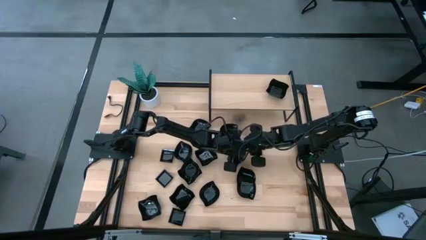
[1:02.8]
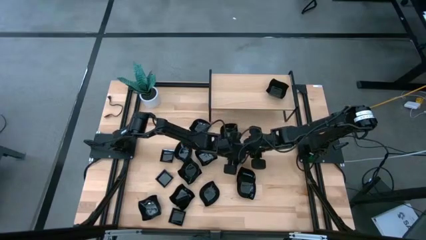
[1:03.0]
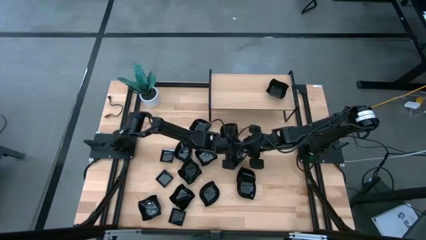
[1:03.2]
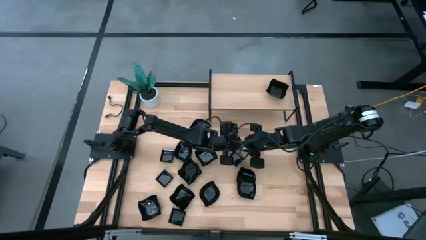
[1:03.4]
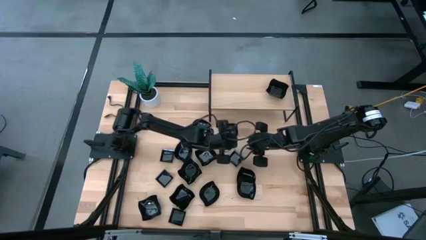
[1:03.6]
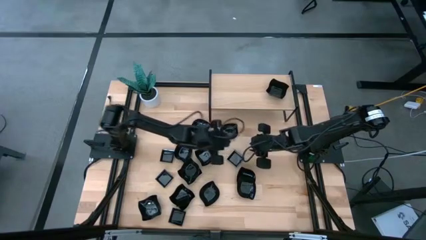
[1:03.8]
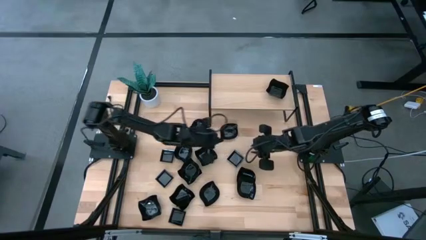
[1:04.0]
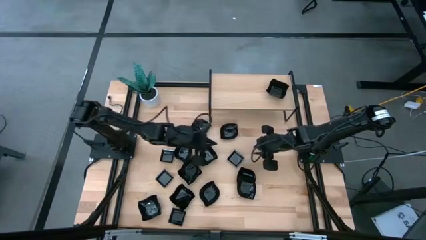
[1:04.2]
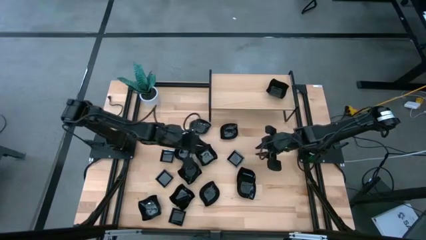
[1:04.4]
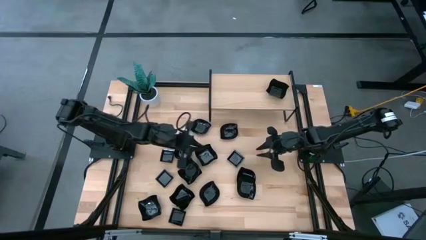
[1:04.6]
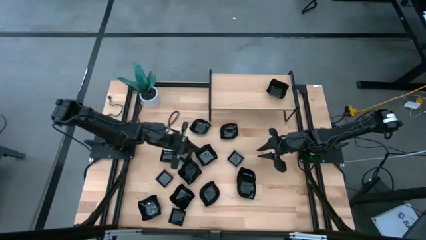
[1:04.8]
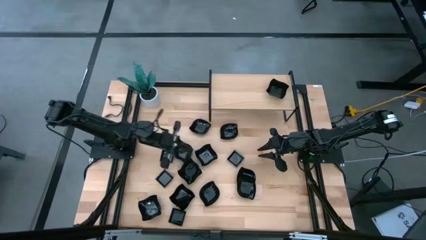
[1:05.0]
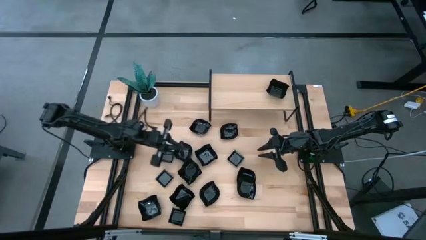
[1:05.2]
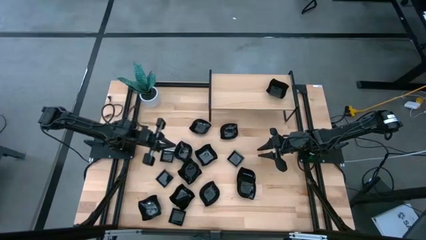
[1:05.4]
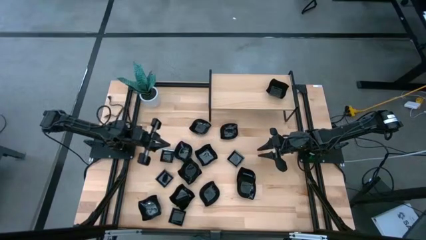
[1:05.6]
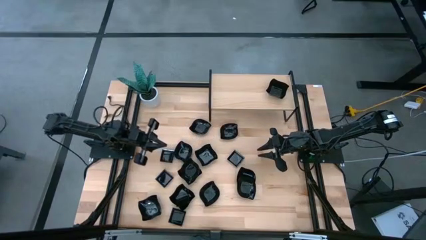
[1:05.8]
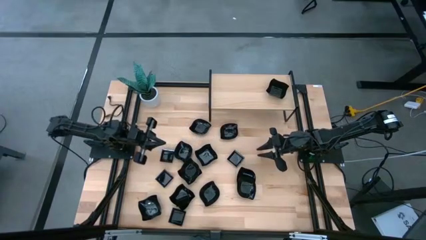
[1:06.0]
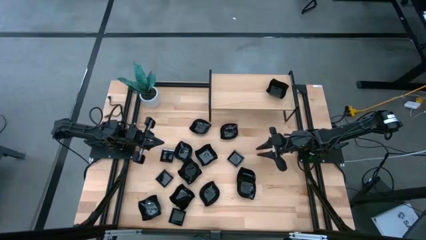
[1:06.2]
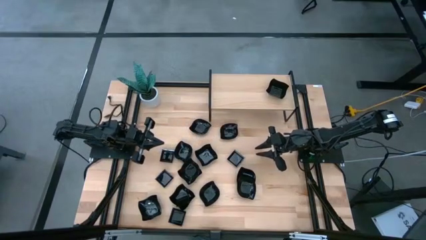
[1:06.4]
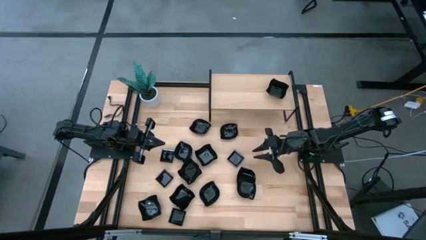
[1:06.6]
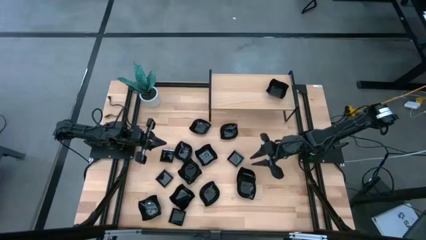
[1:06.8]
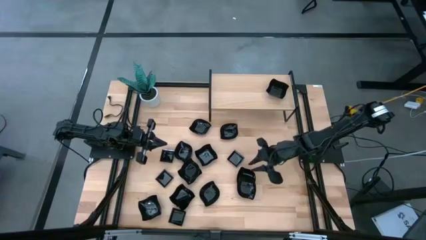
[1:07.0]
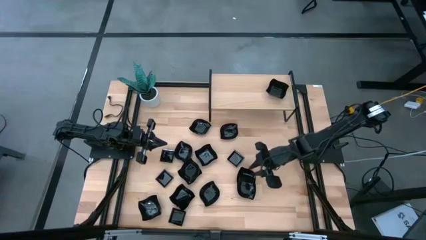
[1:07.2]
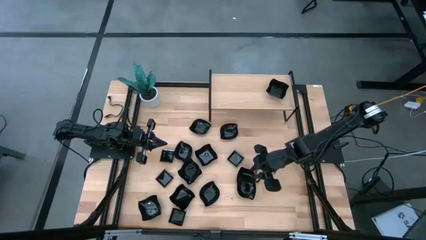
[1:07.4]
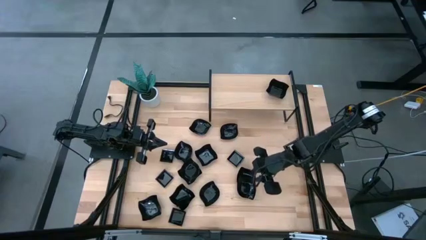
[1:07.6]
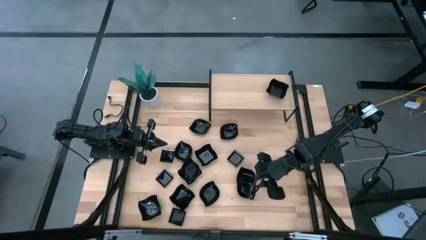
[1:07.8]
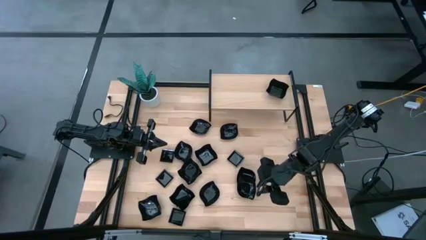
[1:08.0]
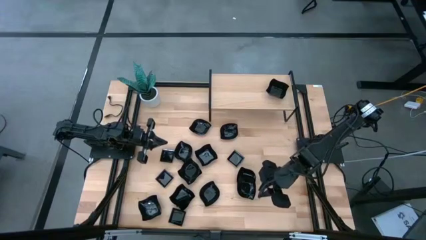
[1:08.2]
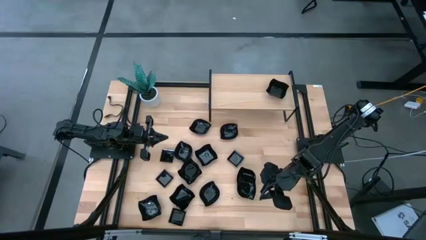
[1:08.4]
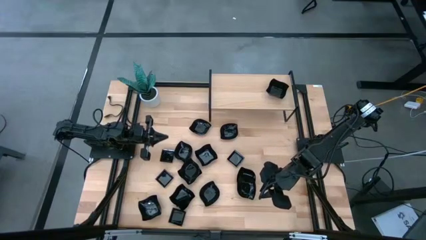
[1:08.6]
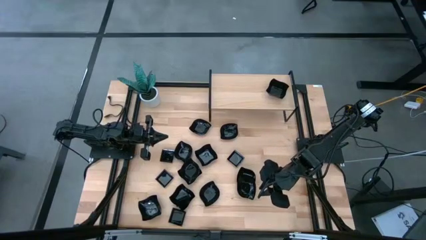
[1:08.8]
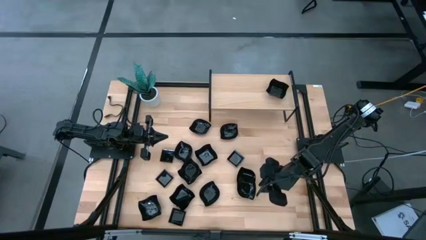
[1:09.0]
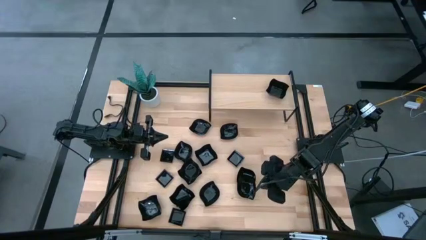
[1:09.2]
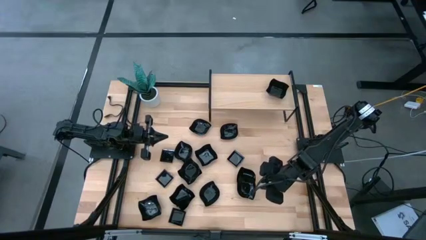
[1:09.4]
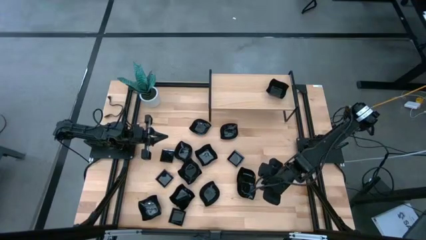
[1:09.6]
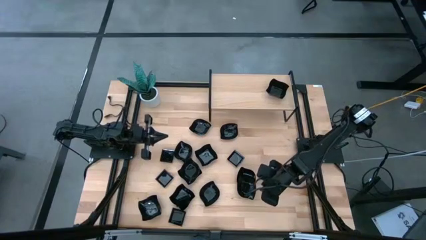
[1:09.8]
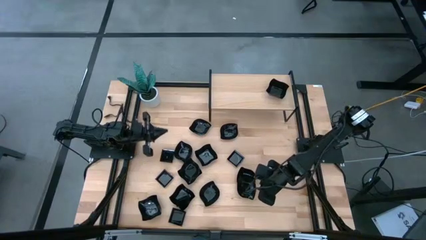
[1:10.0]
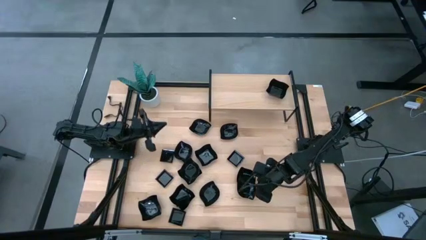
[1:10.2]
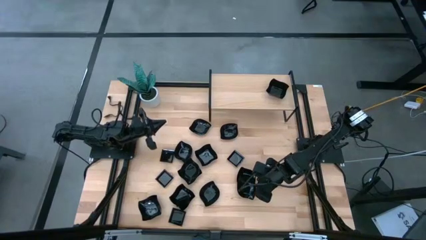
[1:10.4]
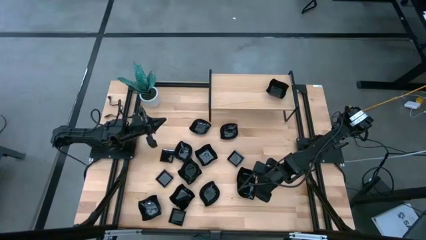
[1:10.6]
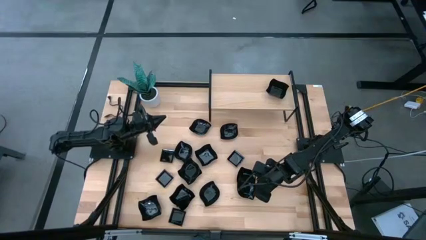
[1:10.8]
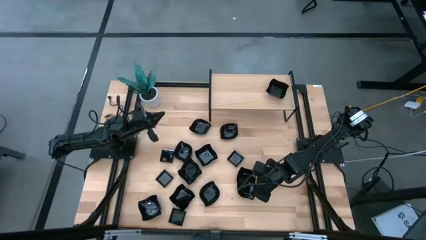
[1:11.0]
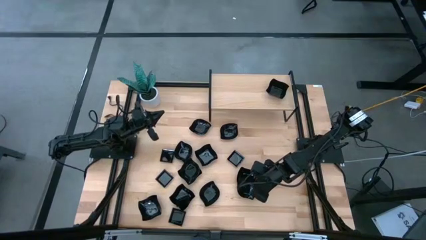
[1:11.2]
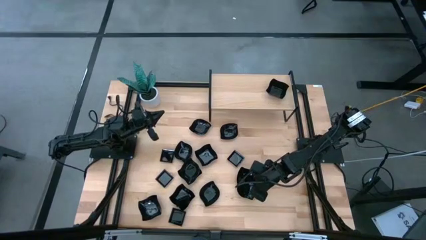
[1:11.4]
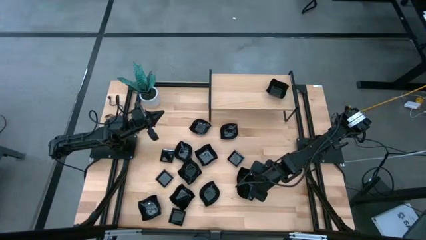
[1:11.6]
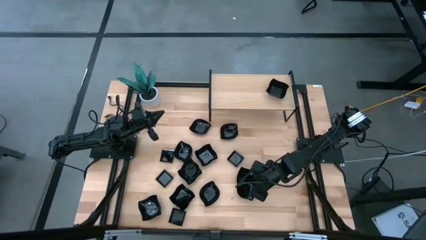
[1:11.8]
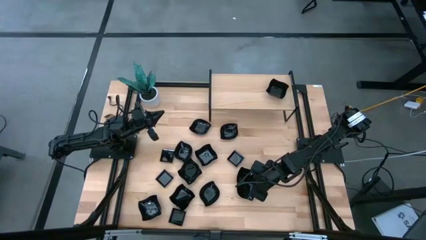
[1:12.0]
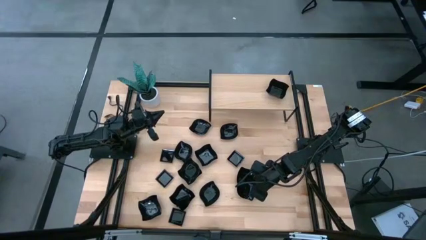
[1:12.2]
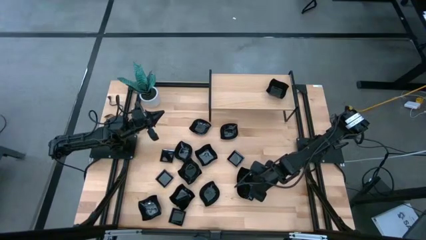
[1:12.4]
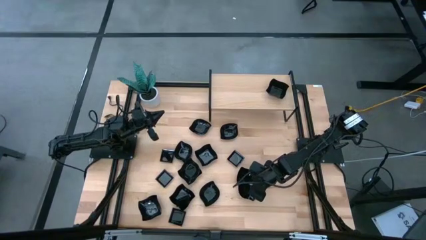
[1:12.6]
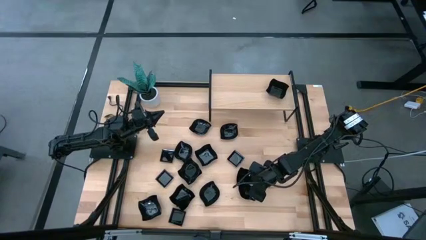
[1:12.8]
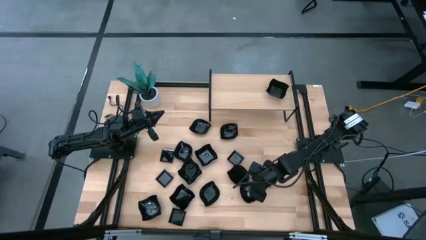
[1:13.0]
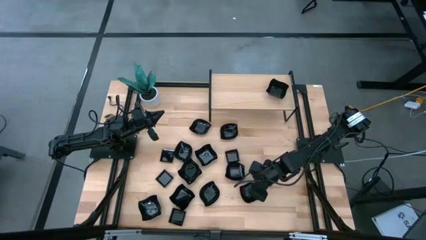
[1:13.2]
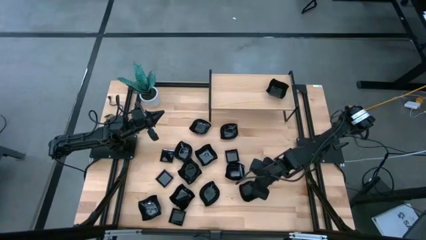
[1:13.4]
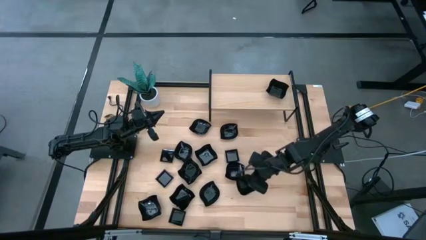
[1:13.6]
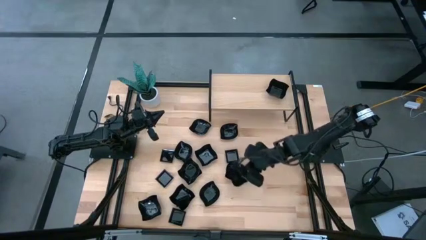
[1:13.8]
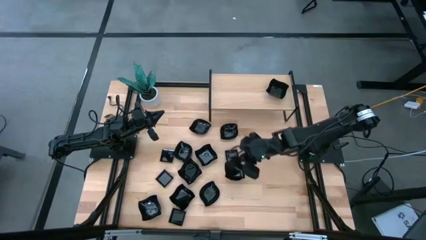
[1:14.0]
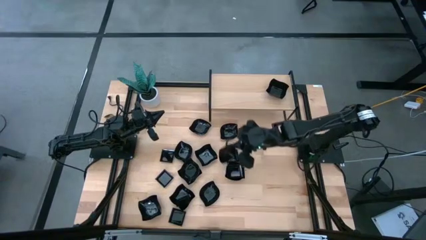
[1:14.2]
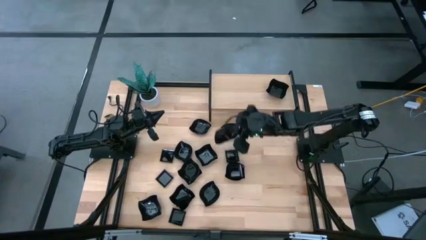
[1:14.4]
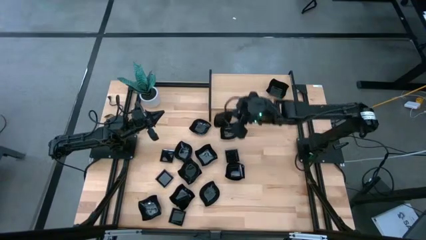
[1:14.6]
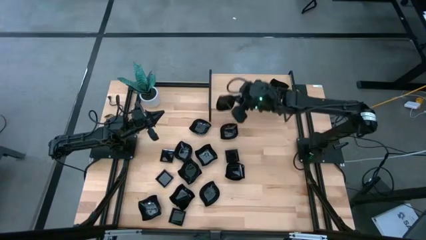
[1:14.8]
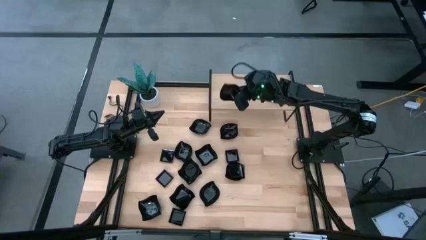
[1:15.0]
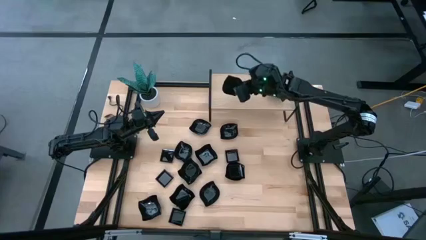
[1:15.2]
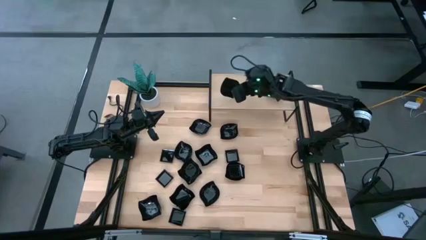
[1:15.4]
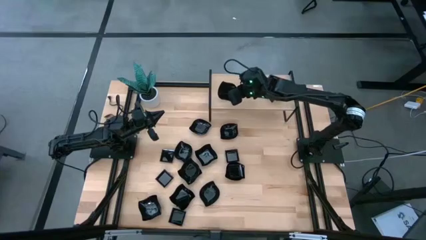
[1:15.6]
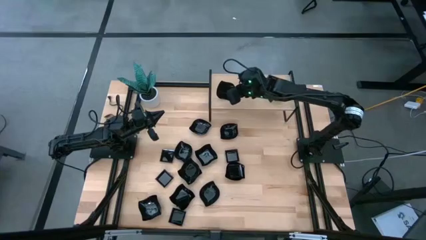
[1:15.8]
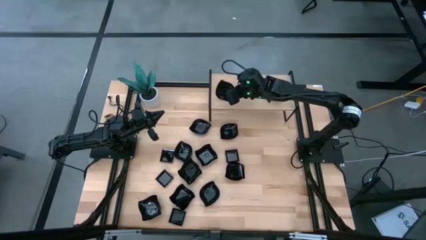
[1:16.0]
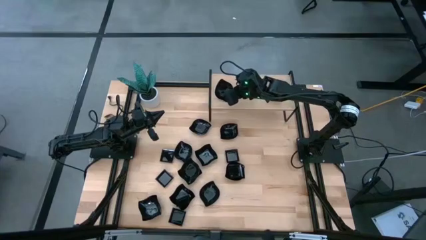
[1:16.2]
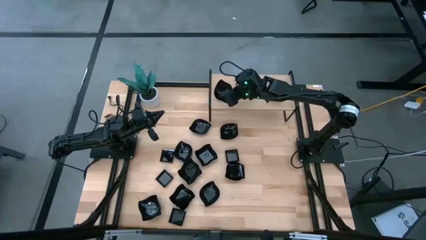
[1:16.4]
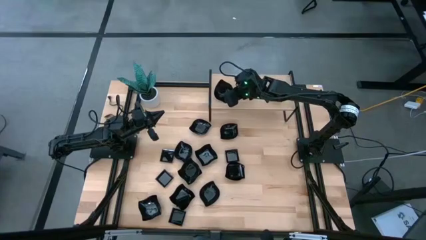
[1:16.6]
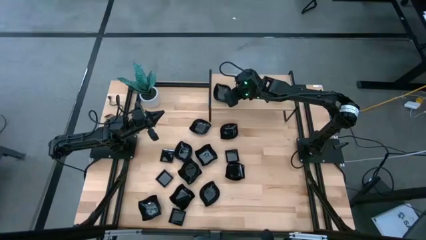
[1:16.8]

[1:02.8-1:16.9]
Task: Pick & Place Mini shaped plates
Put the black leaf-shaped plate on the shelf

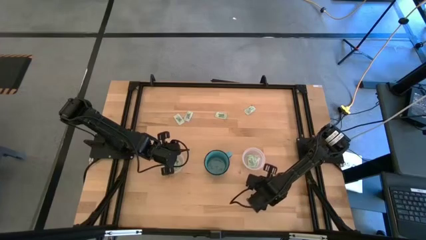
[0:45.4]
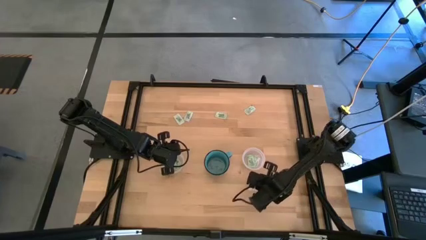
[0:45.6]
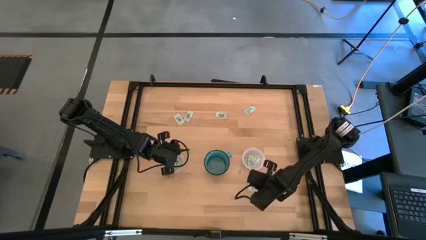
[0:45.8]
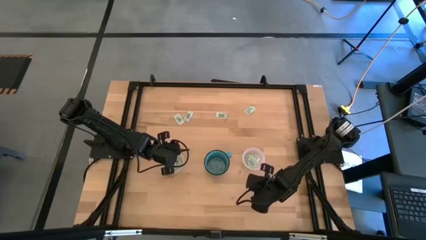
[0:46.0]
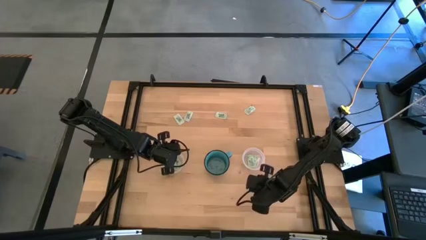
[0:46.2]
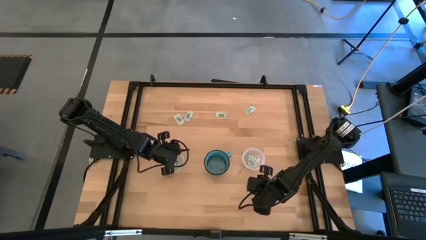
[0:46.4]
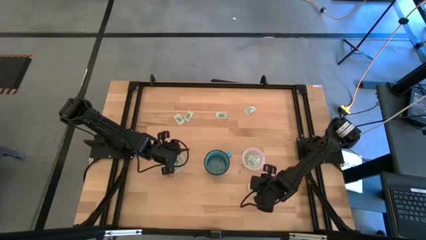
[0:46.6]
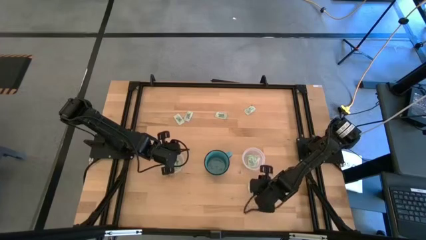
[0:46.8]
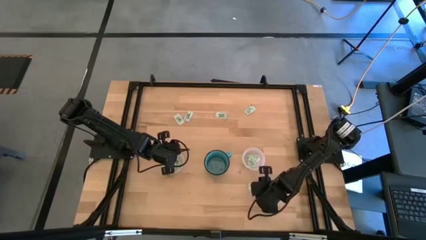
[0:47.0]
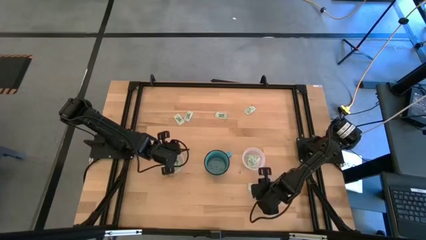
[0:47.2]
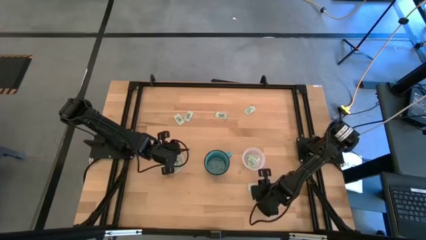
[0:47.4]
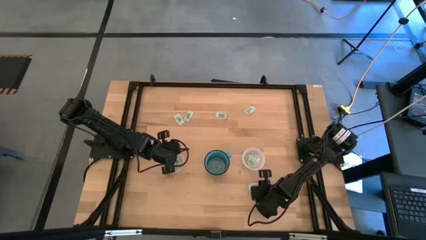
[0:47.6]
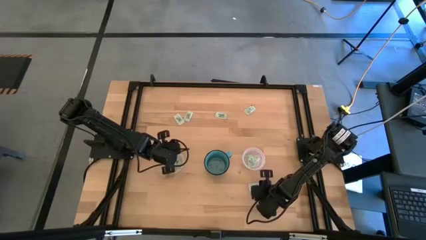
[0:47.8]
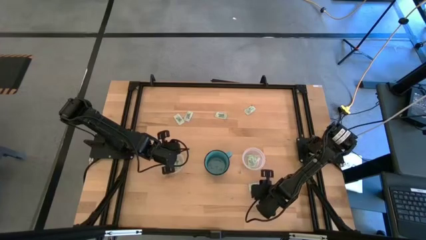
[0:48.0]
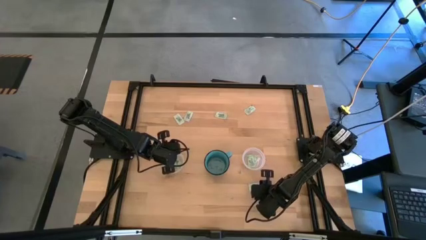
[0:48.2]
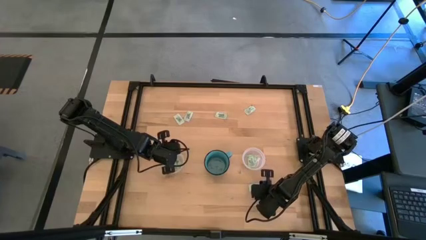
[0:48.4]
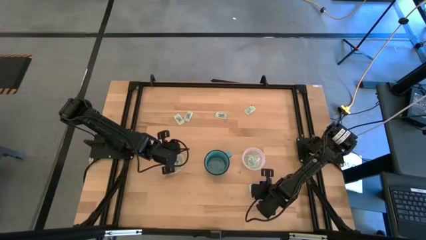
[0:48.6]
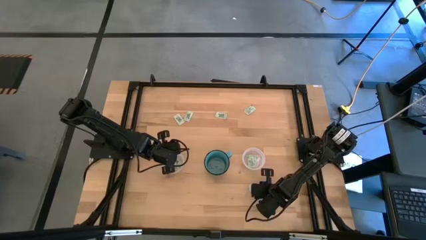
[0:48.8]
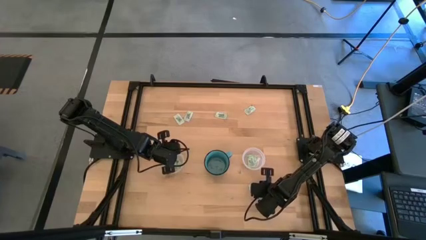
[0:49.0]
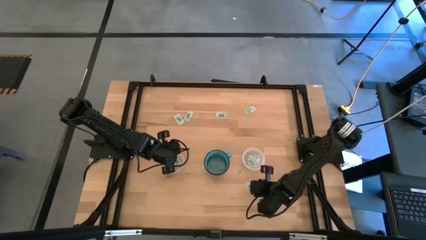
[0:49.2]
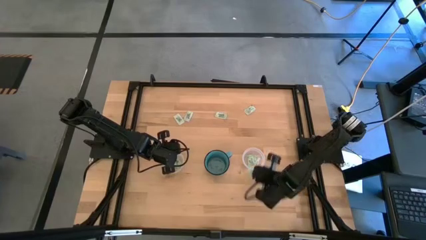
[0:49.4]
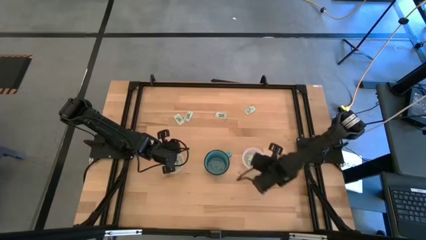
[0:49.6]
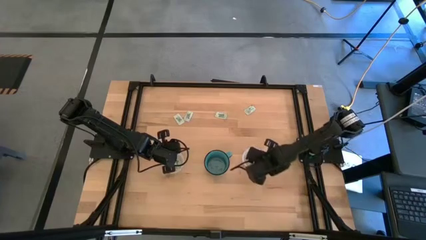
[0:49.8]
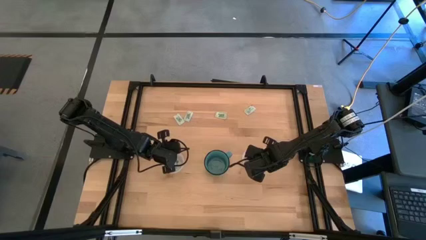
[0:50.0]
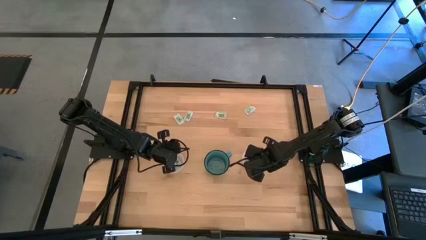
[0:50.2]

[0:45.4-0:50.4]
Task: Pick and place Stevia / Truvia into bins
Put the green stevia packet into the right transparent container
